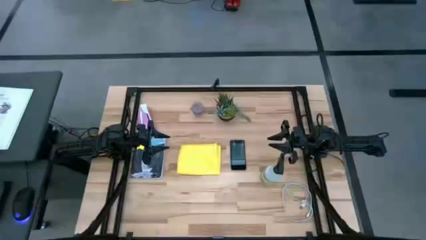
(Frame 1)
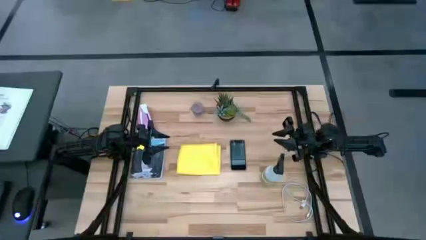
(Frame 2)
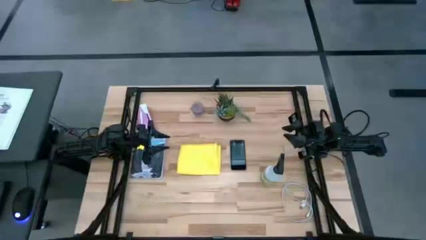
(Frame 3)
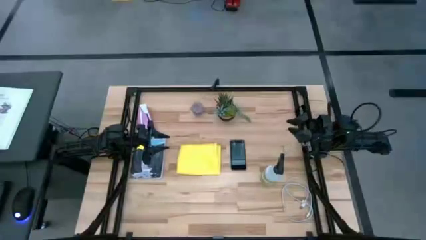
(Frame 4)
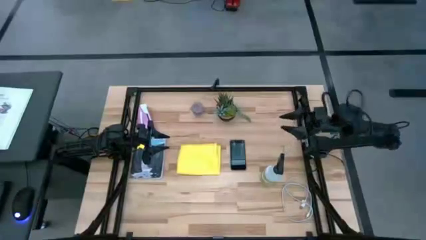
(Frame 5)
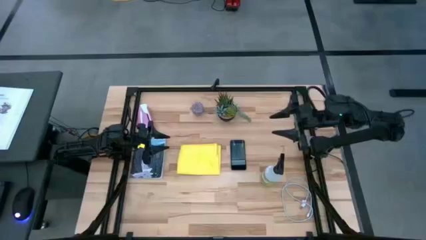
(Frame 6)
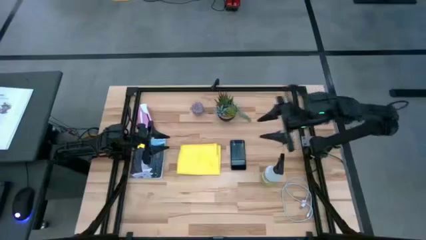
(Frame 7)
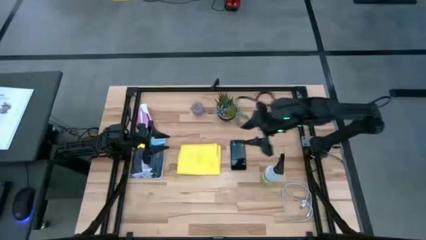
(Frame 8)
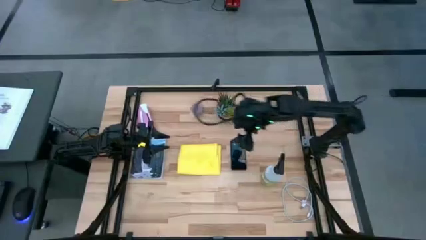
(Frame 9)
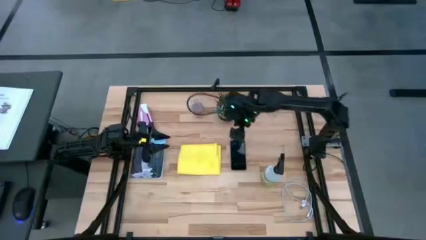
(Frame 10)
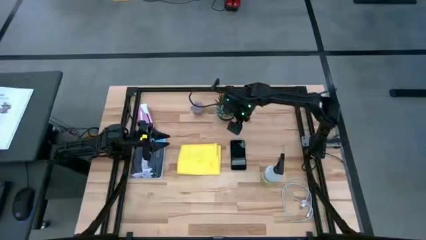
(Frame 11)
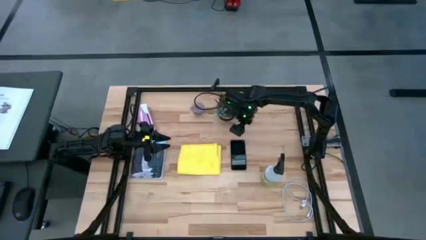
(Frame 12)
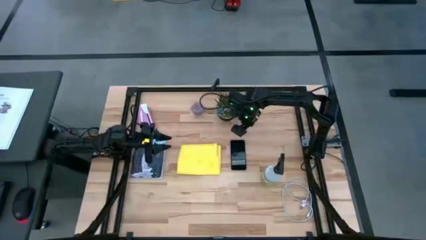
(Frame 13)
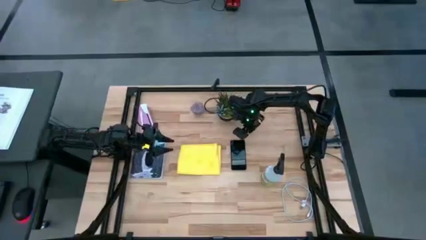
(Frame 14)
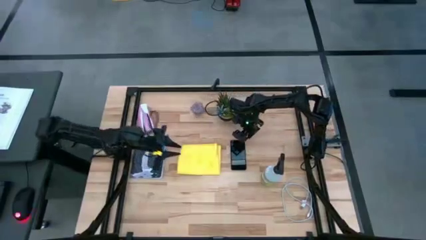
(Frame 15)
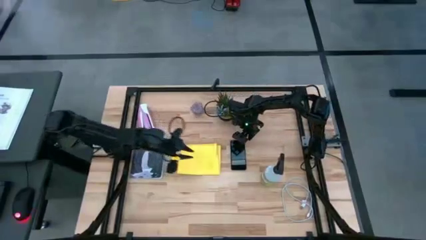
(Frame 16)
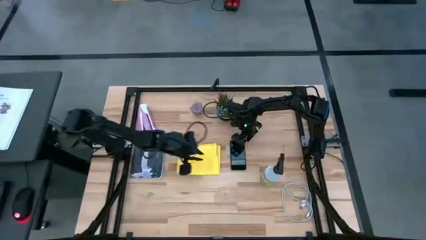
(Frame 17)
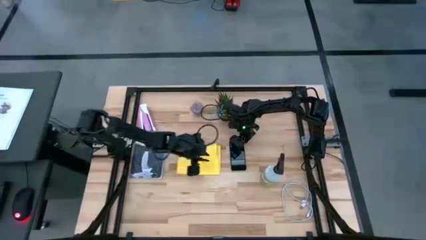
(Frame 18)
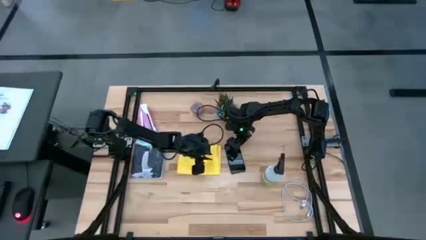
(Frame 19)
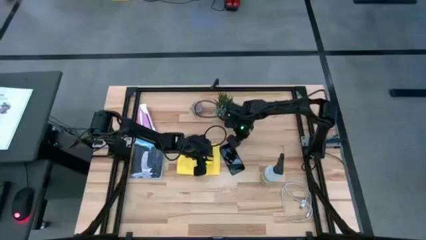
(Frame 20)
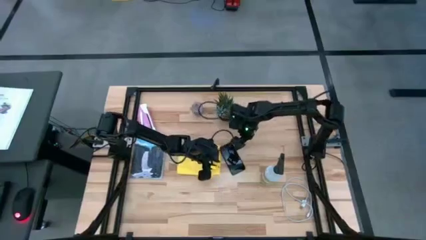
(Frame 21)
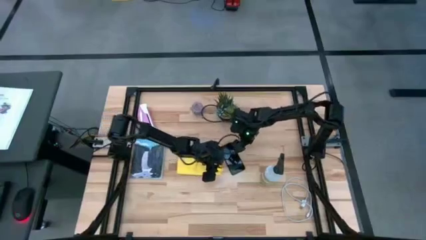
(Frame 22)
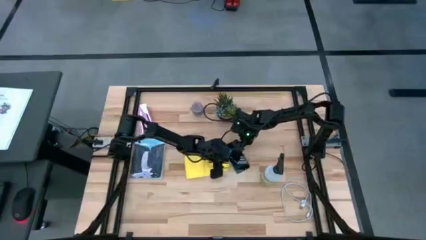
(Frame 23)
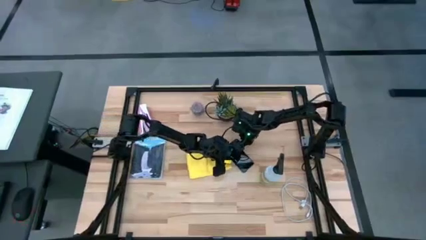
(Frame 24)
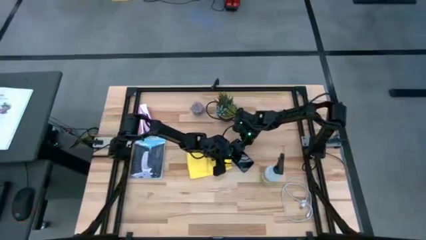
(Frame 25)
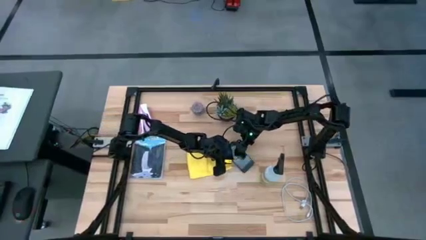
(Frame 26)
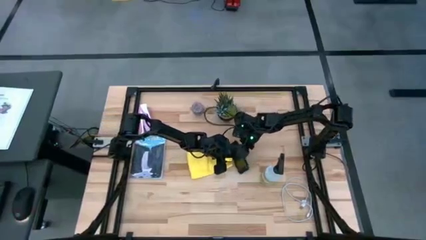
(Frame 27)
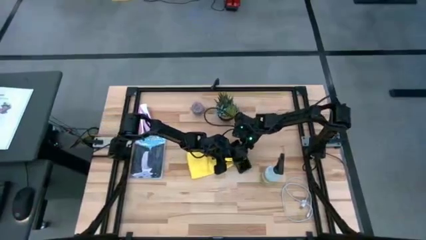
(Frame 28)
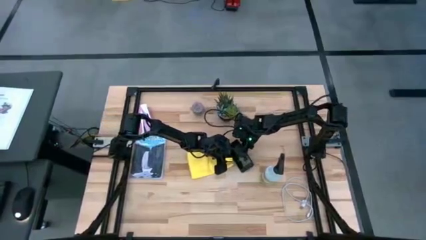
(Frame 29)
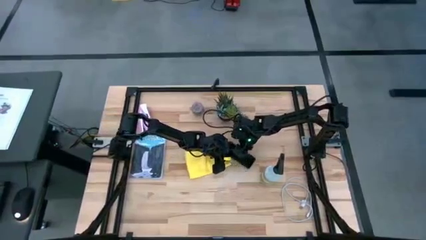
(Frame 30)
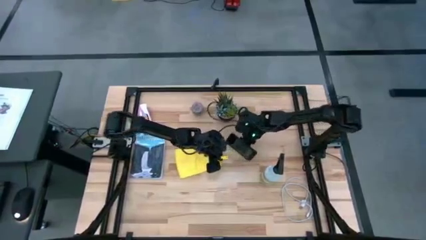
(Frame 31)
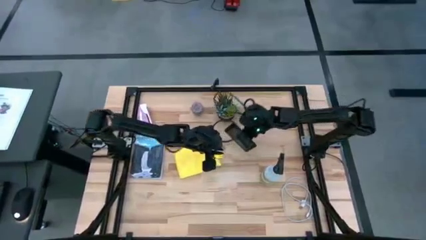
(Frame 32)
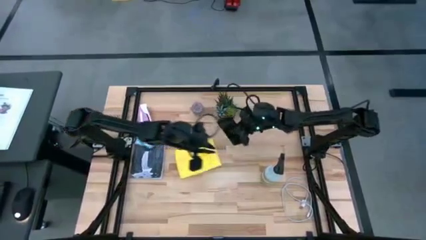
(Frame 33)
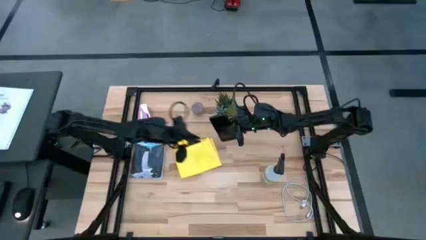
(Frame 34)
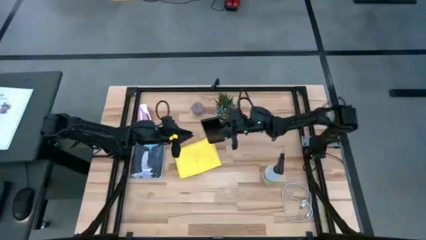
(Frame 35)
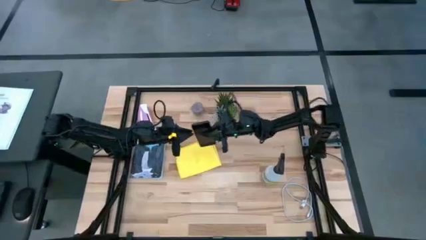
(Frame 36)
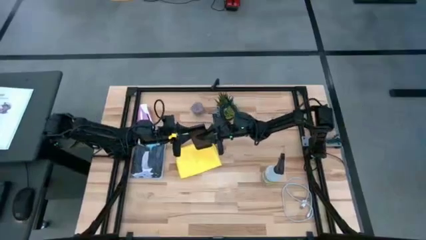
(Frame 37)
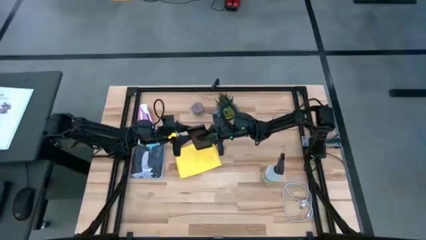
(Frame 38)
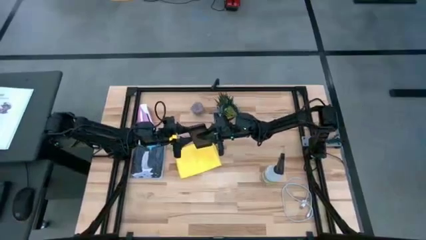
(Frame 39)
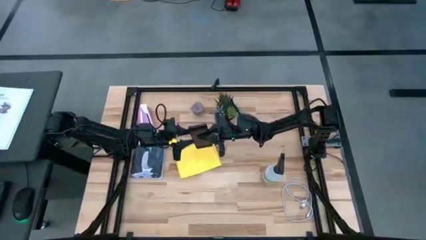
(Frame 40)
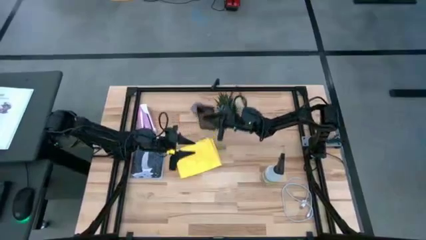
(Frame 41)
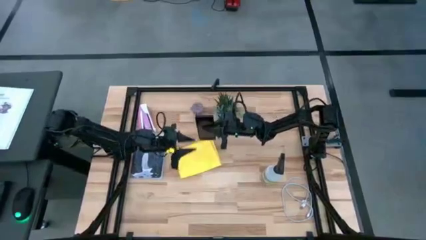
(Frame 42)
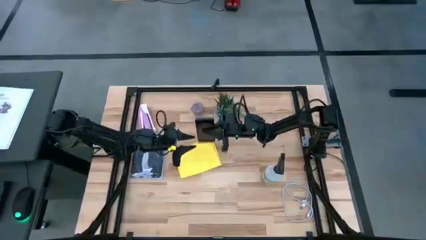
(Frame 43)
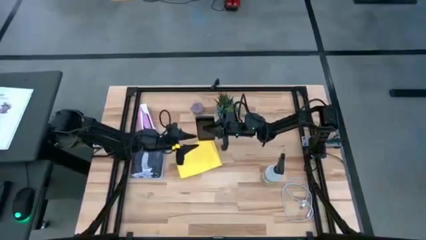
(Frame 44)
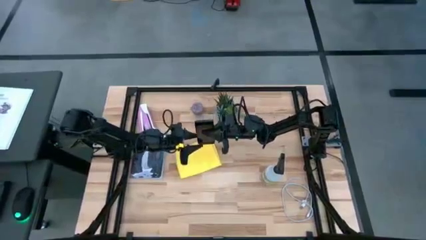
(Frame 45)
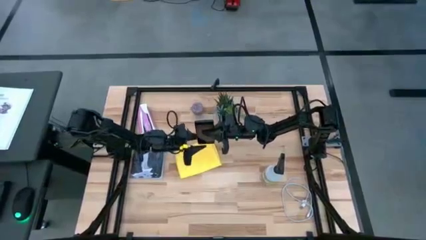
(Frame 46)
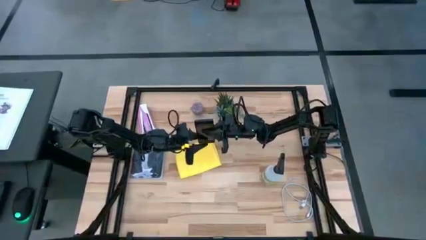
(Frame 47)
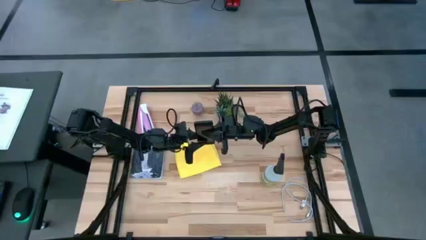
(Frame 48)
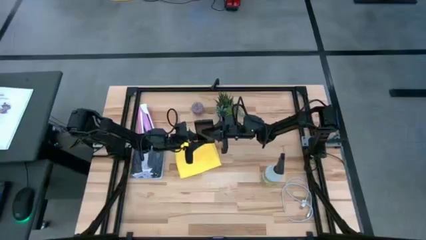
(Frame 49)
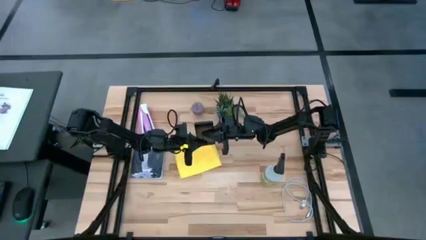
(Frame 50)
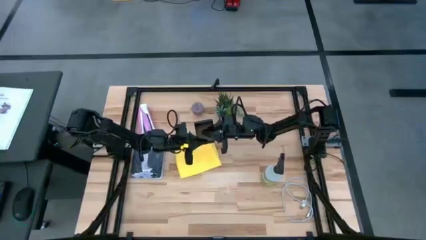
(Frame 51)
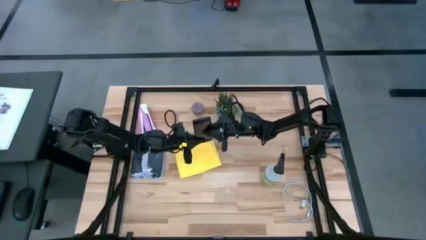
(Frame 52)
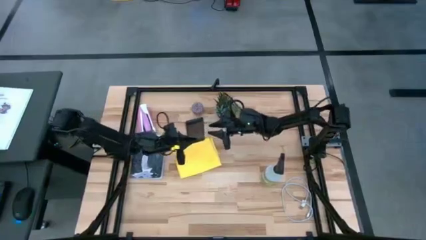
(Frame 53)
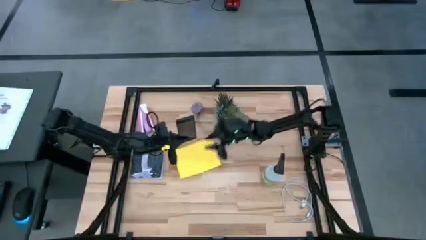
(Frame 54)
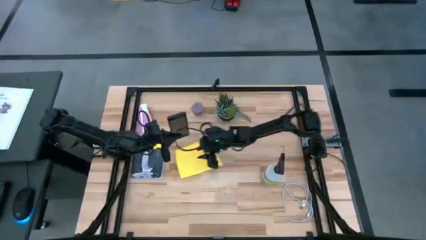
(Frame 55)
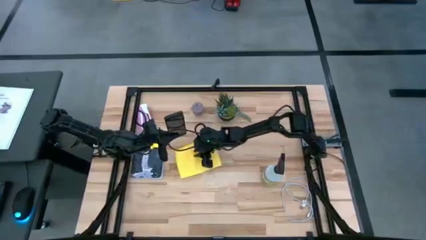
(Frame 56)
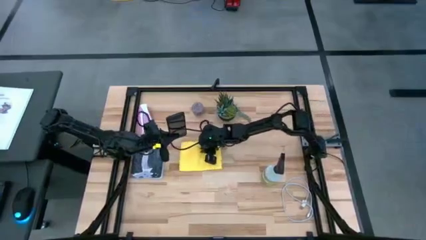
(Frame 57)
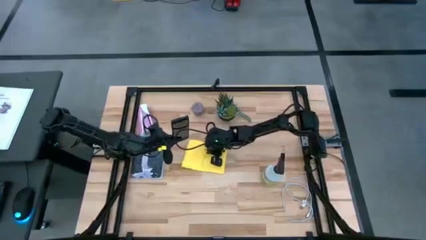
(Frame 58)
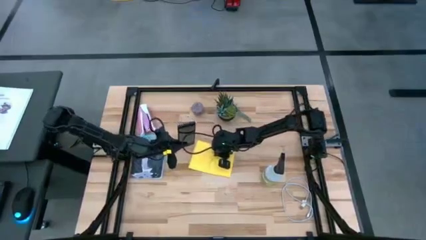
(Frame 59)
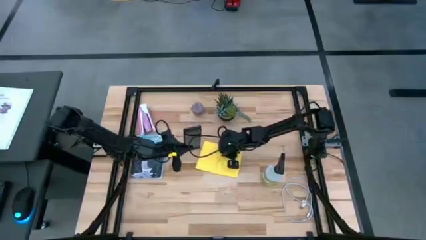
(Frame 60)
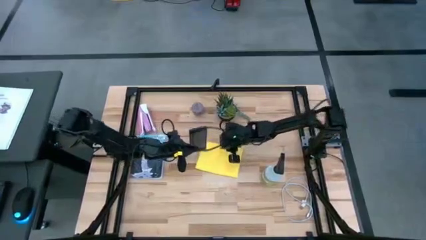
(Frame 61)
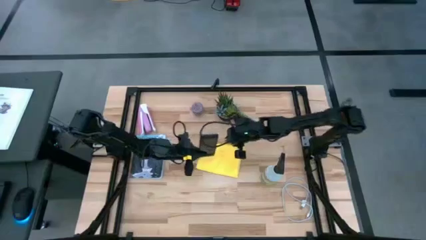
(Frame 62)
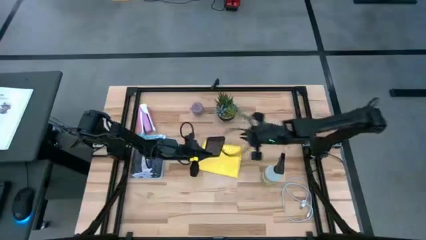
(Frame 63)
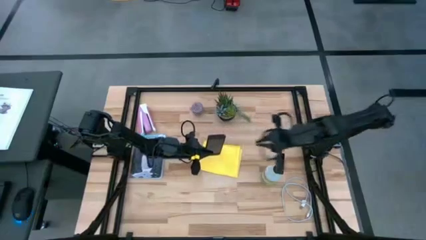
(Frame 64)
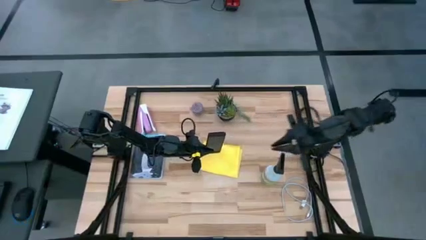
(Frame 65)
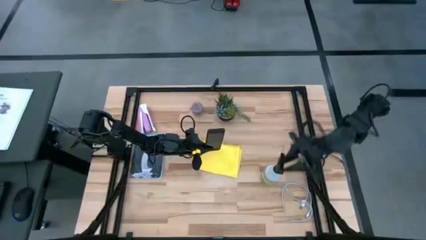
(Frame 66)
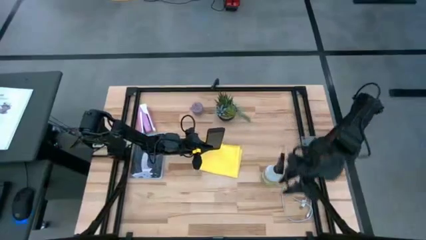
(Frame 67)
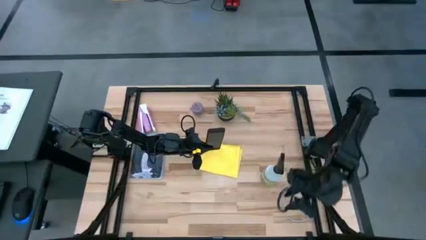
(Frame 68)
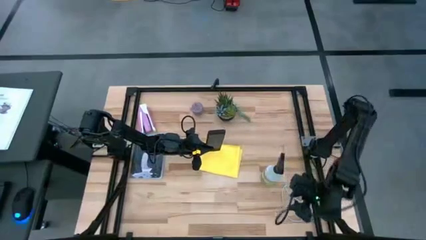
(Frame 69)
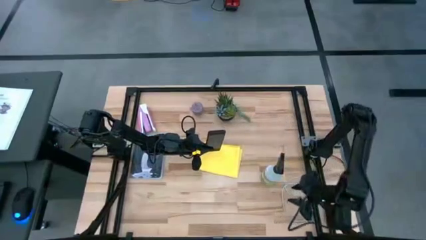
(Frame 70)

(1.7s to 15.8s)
Task: Apply microfiber cloth
Spray the cellphone with the bottle cleaner

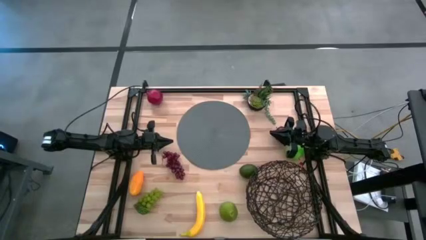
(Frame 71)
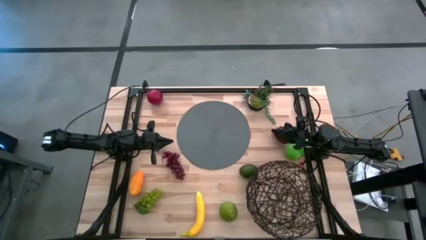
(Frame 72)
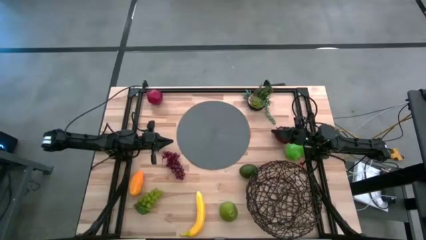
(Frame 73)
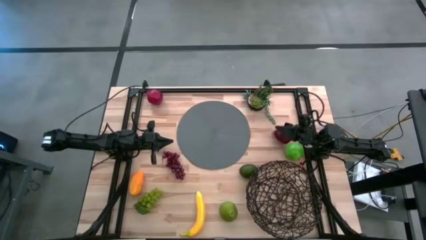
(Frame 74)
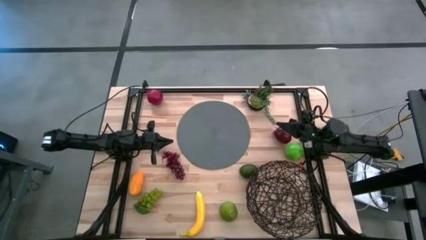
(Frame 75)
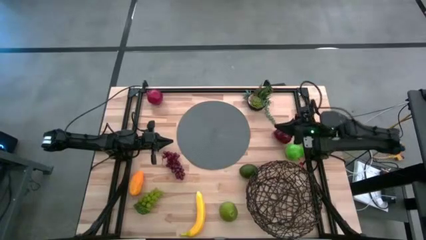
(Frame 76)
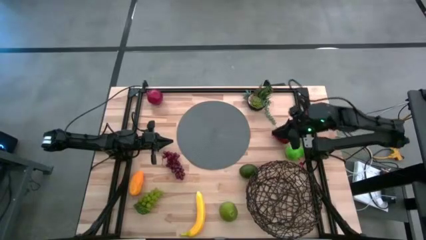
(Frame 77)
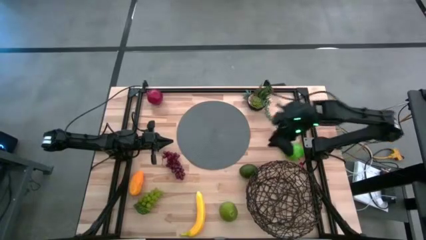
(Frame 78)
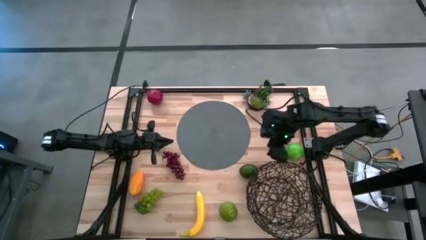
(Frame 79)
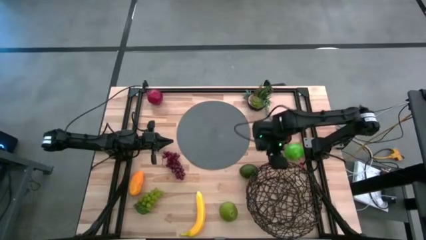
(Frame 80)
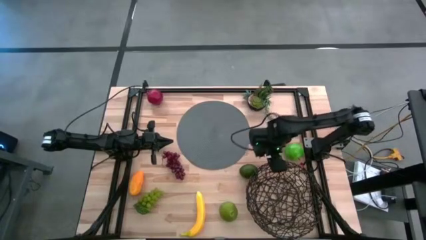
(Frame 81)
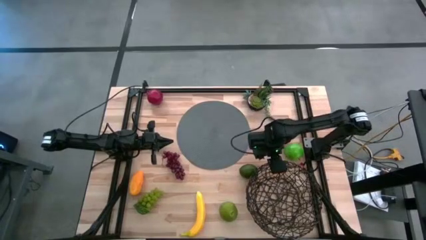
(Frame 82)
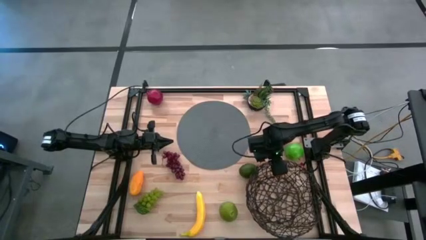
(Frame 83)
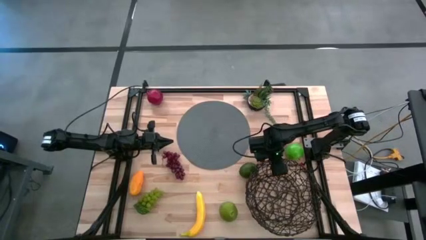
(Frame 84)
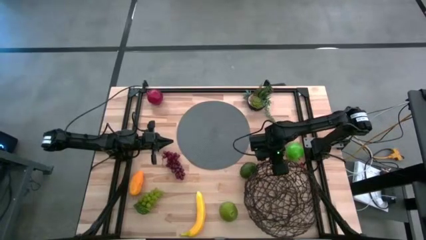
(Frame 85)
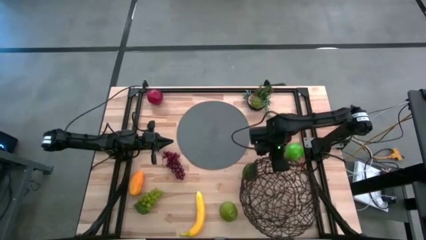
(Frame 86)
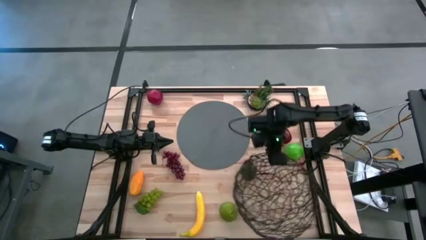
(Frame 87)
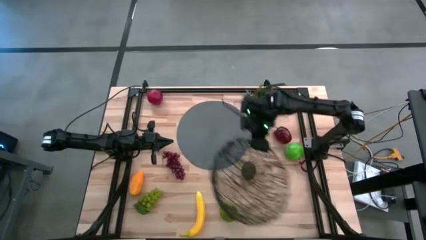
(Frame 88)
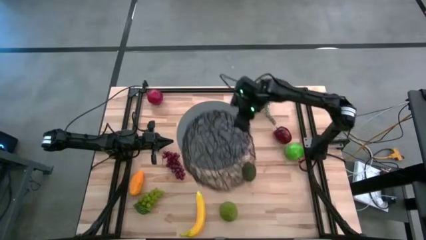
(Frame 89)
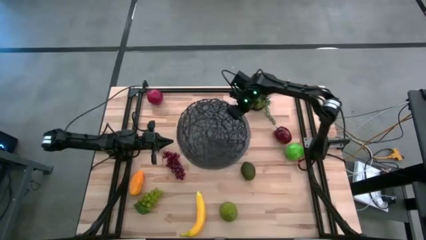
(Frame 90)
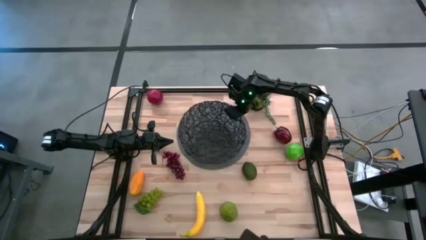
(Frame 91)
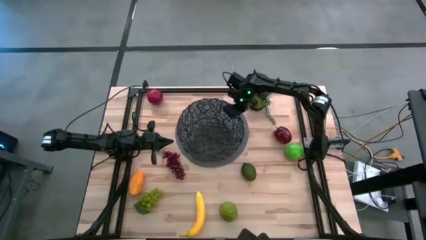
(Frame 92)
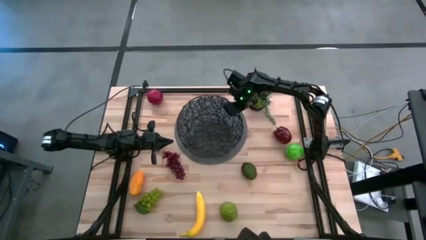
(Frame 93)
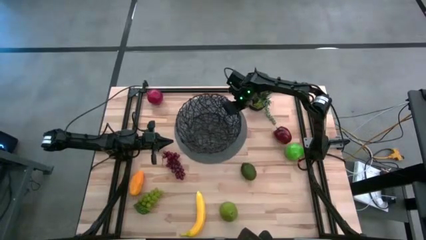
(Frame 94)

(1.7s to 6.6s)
Task: Build produce basket
Put the black basket on the gray mat
